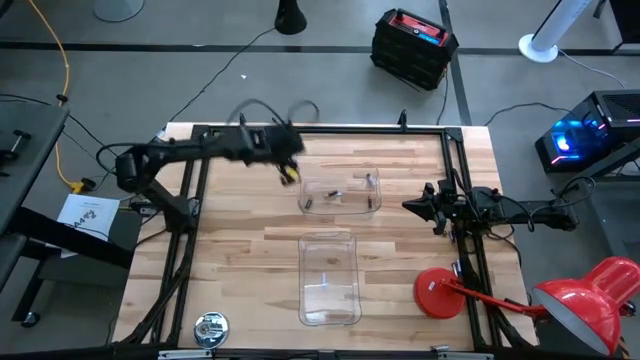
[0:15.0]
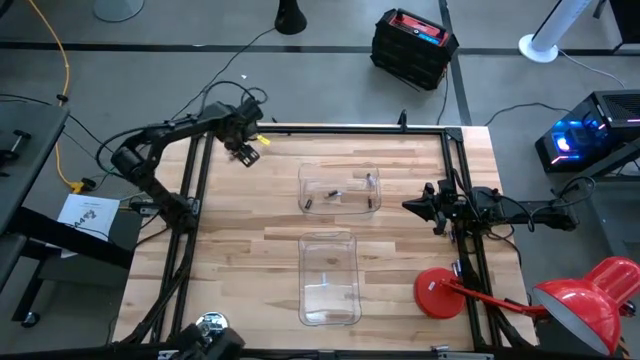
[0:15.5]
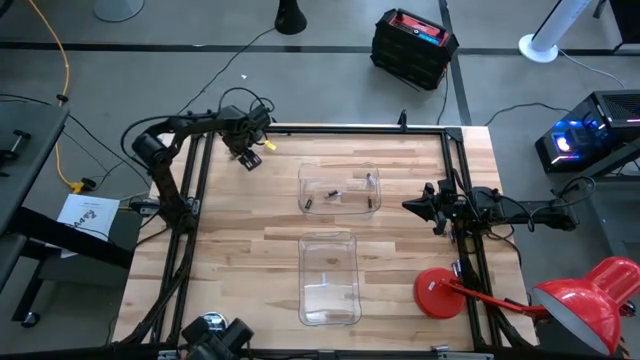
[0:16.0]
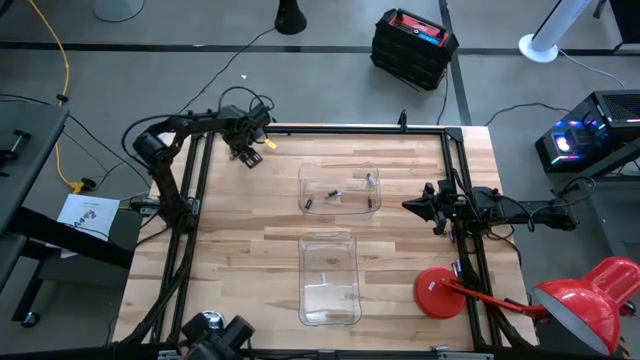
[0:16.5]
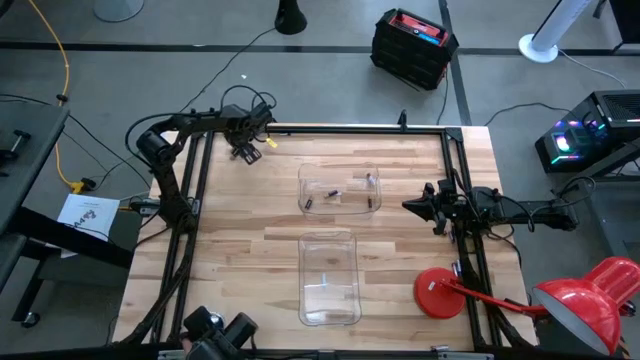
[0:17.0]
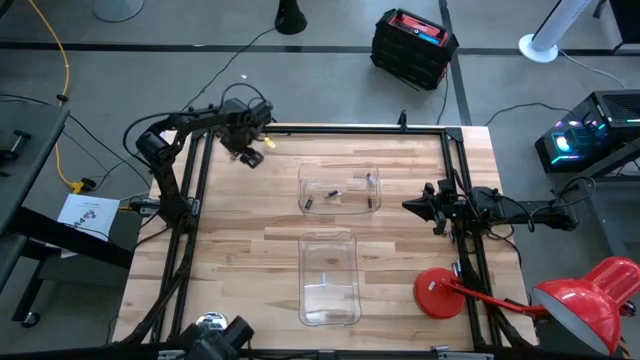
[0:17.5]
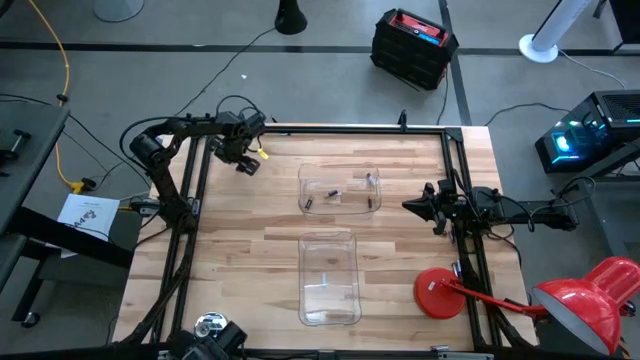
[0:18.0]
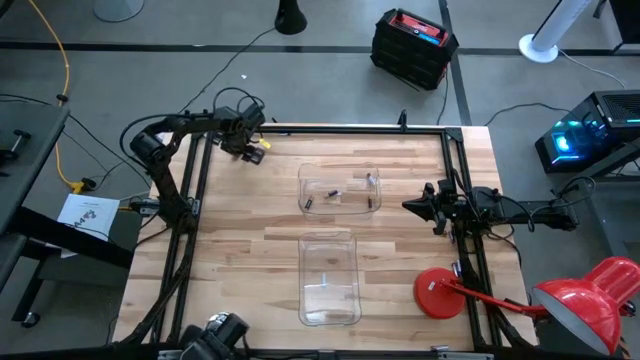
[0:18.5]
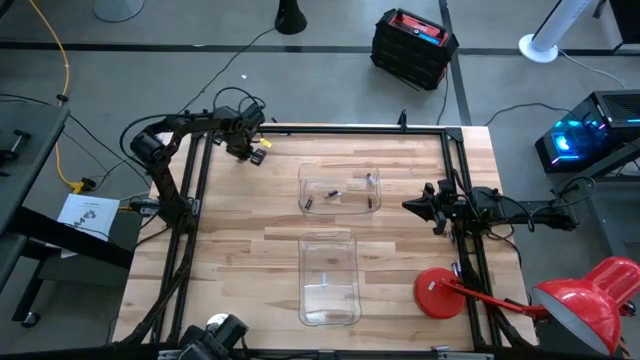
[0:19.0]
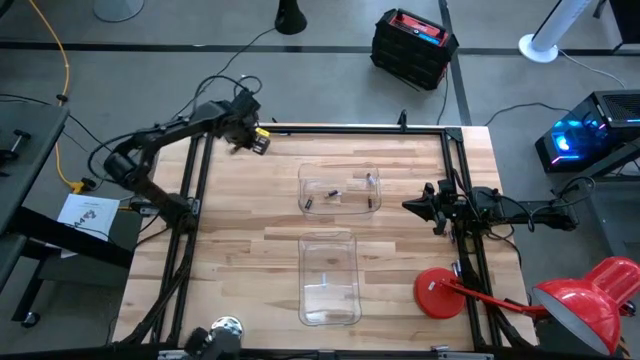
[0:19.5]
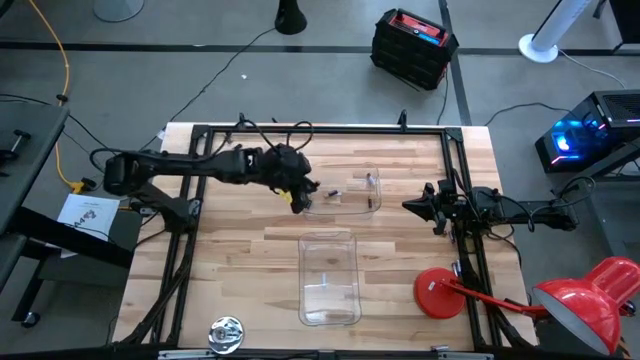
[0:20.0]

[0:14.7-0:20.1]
Task: Sort batteries
Put the black battery into the top transparent bin

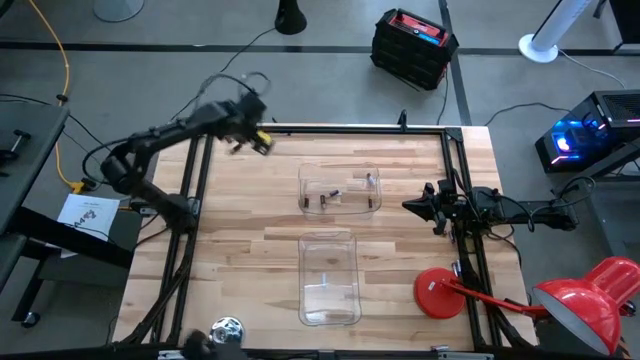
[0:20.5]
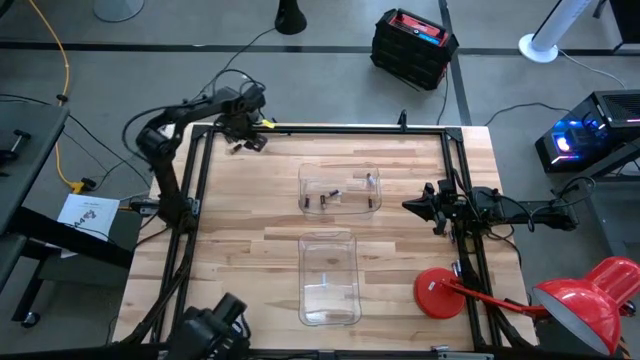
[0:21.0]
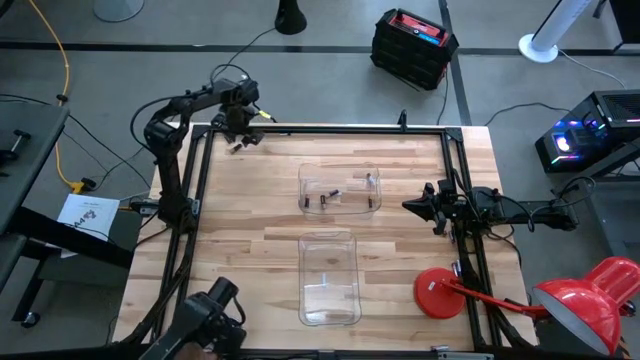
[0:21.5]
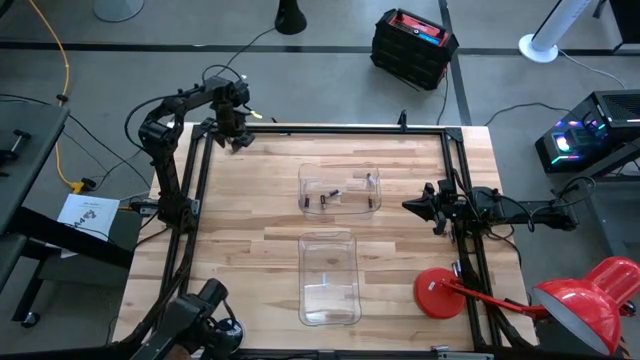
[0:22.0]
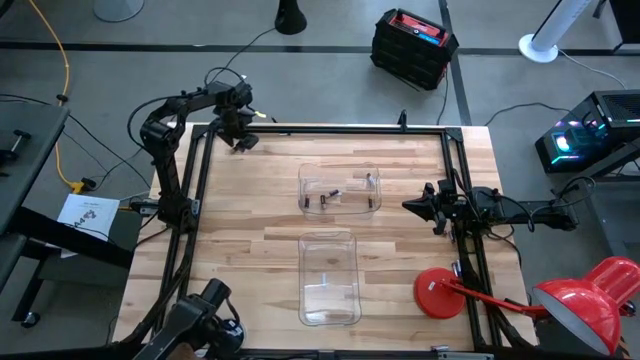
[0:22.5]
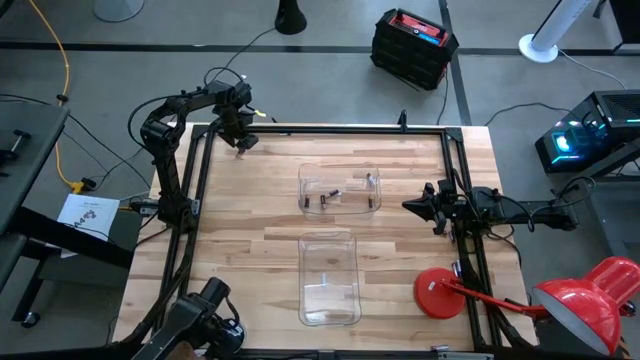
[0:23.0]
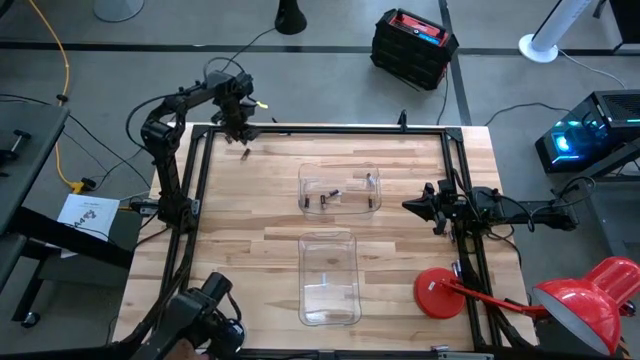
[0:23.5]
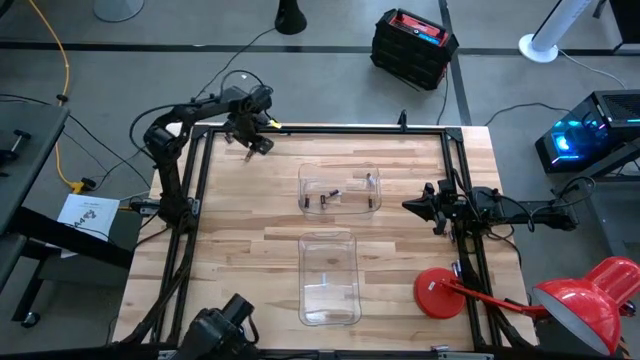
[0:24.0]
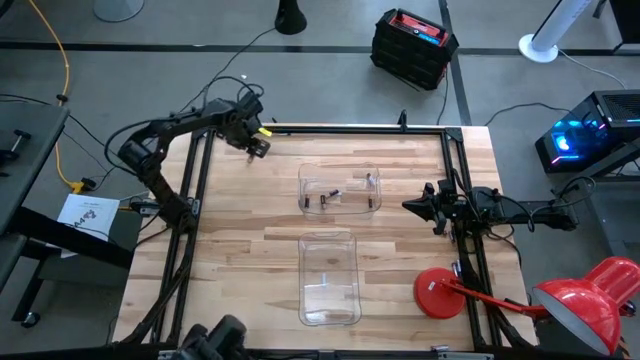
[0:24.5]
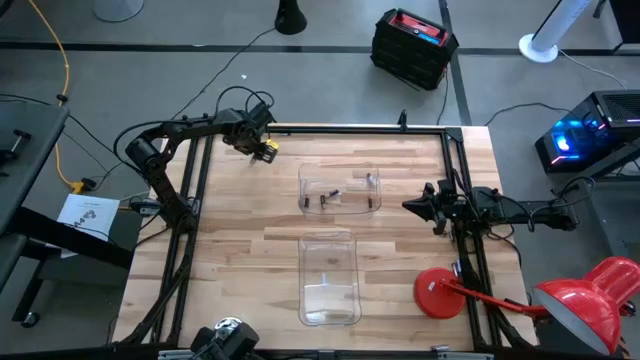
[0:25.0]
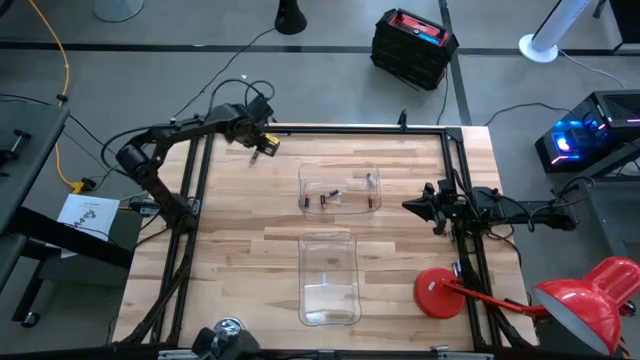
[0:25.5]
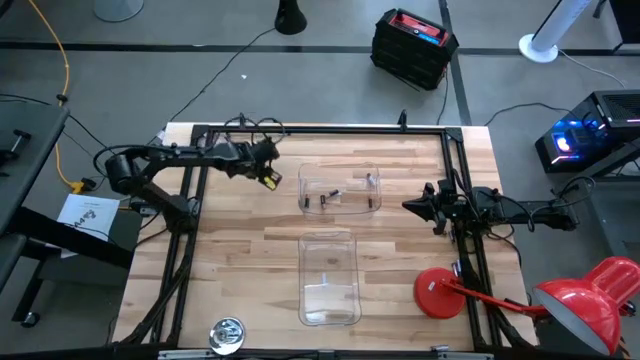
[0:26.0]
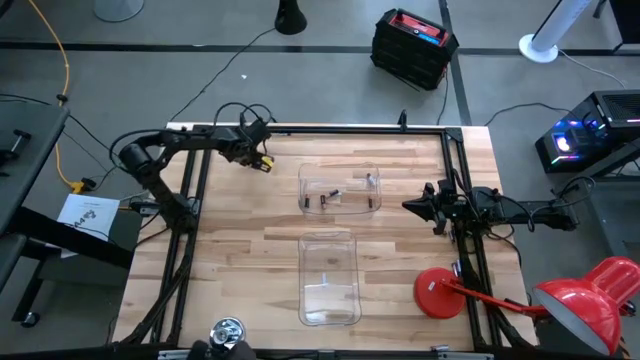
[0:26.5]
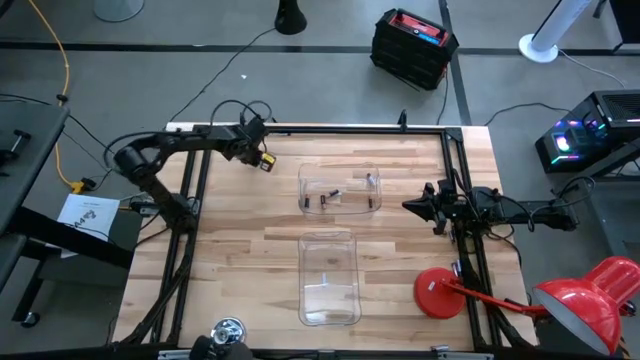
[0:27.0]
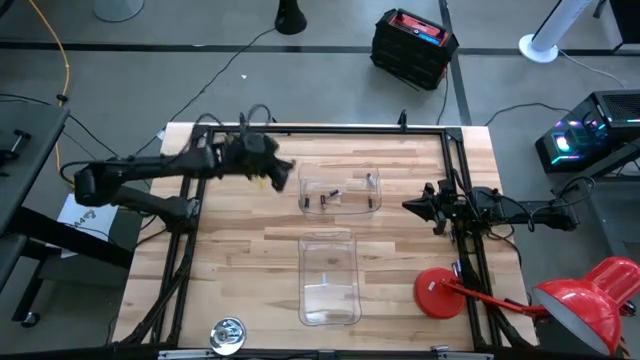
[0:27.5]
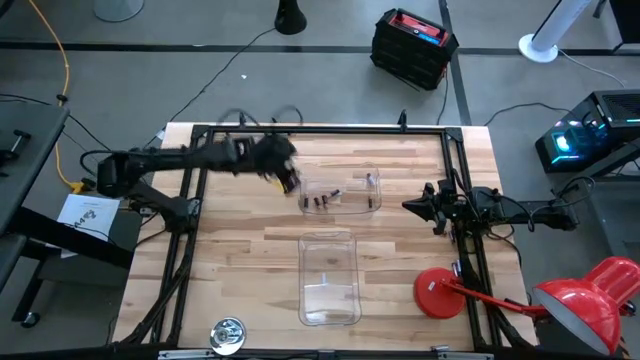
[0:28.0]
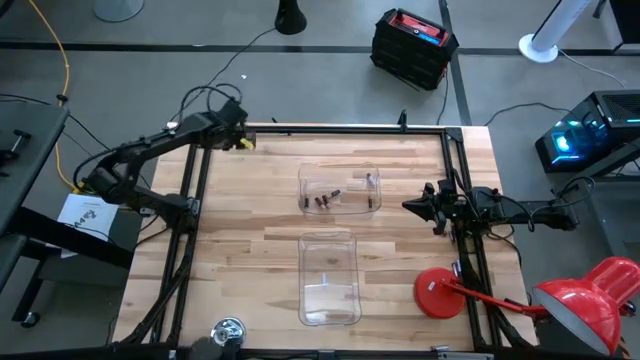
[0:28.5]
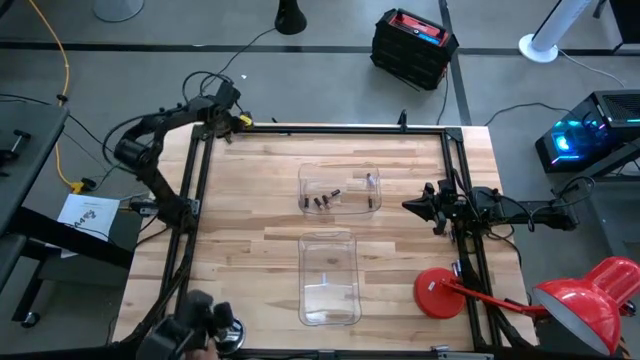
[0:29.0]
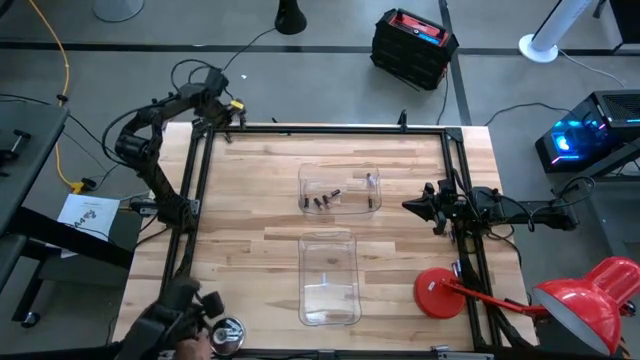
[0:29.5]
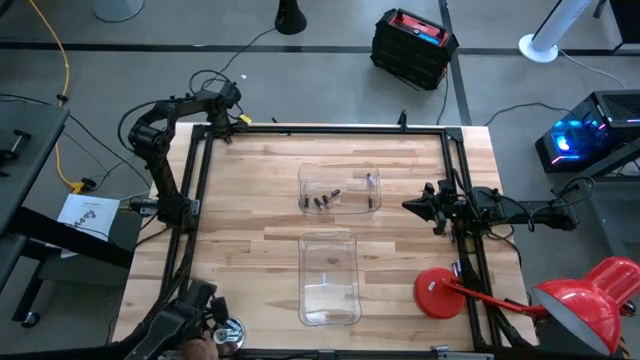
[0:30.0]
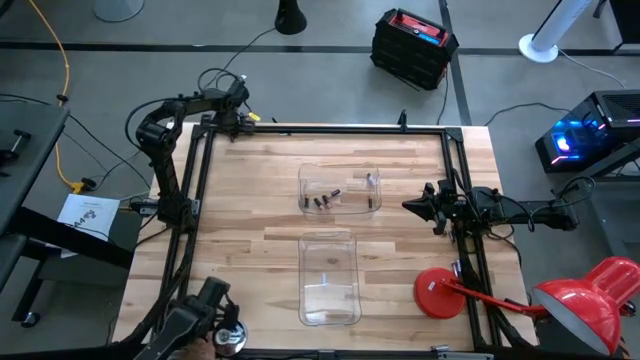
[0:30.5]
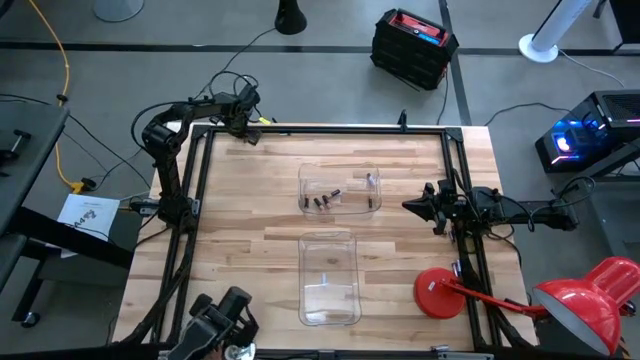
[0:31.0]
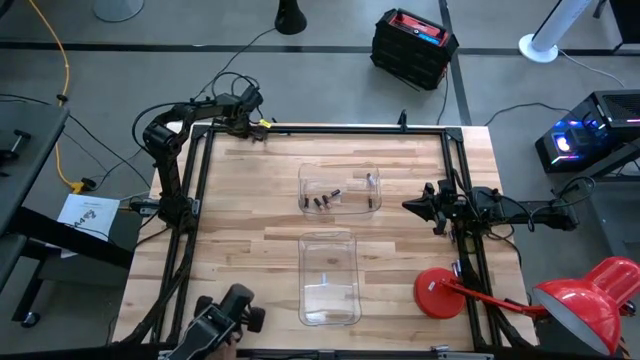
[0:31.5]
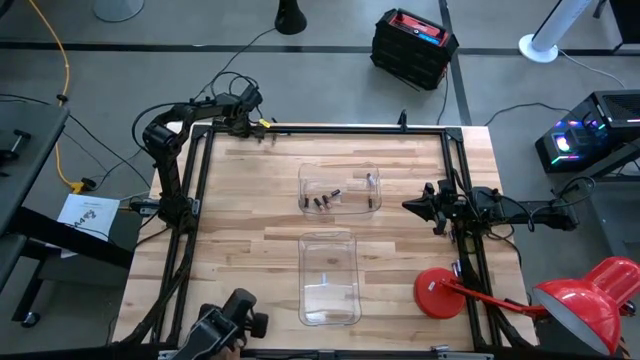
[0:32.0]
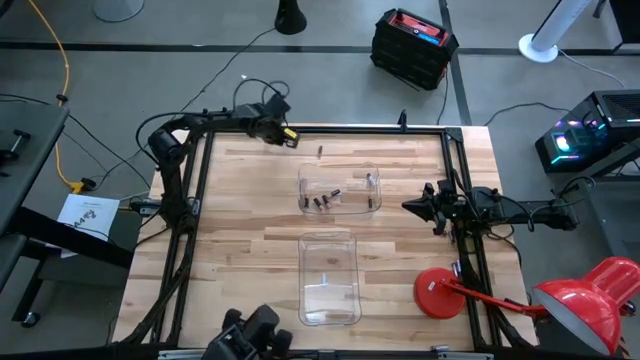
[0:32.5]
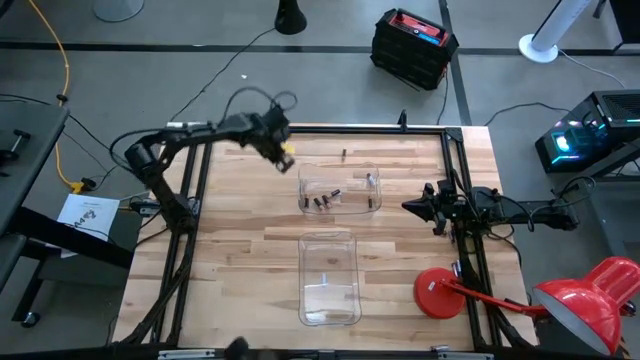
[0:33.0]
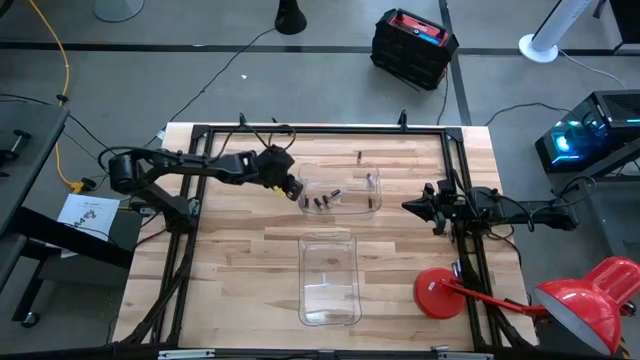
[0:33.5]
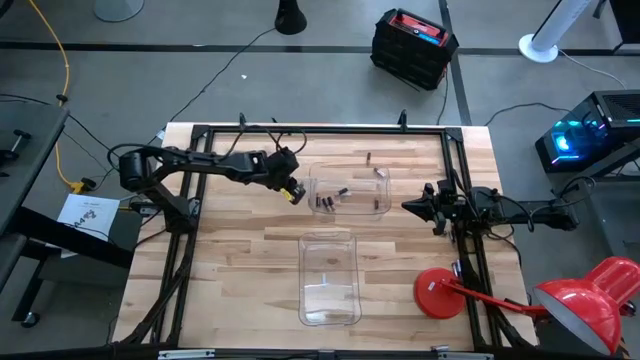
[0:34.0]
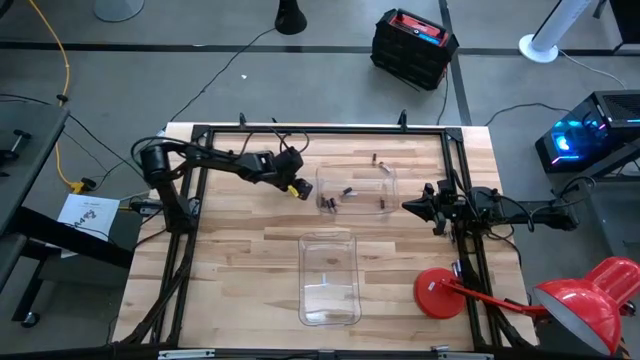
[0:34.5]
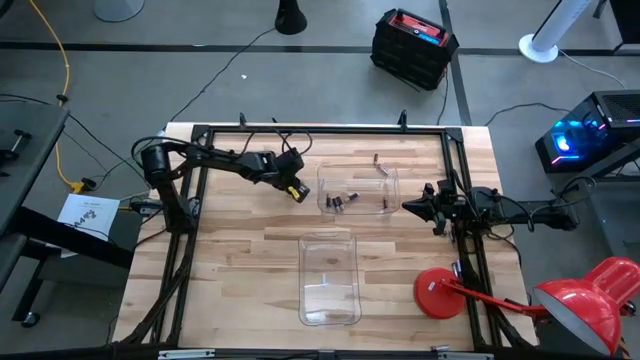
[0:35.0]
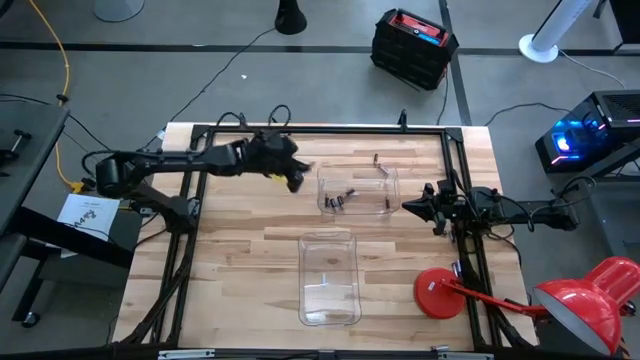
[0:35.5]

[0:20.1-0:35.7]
Put the black battery into the top transparent bin
